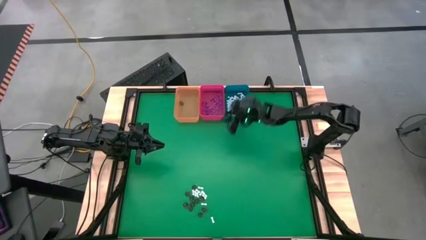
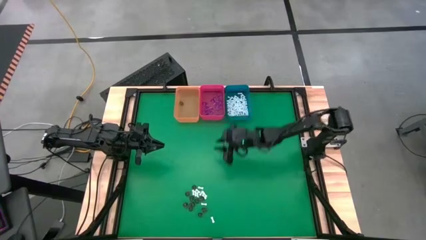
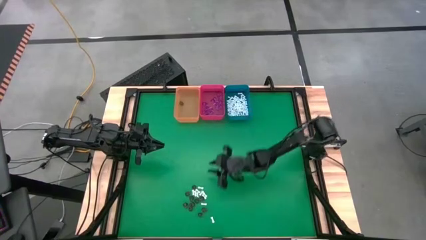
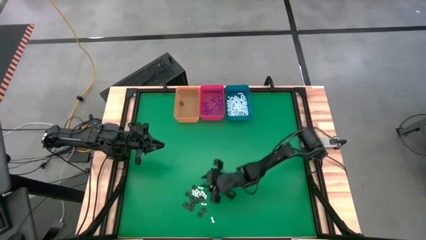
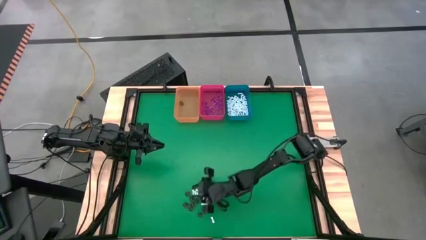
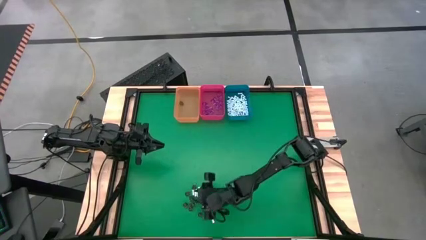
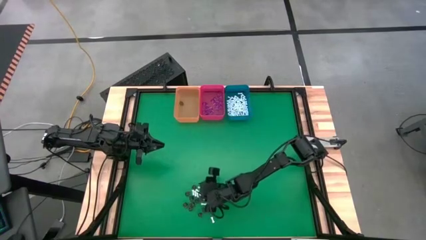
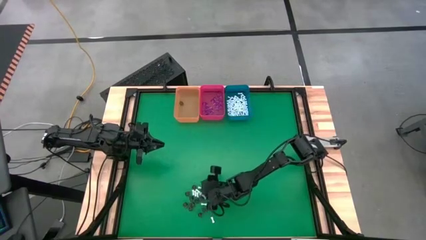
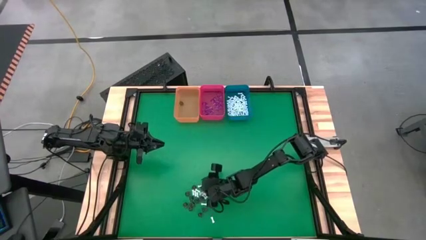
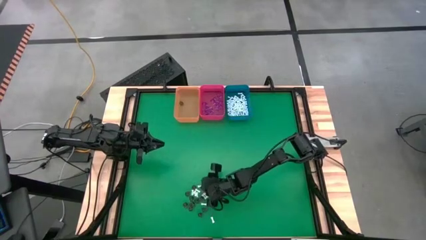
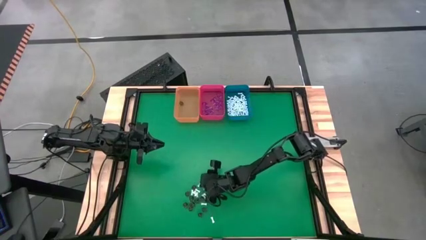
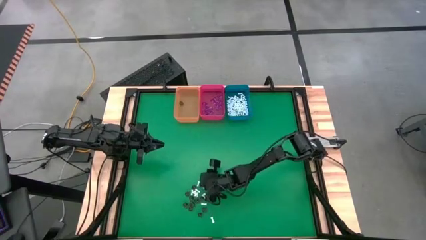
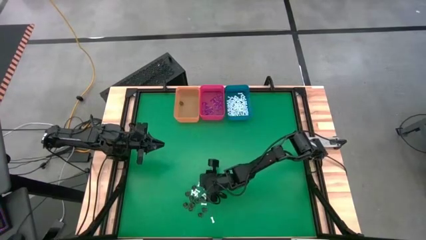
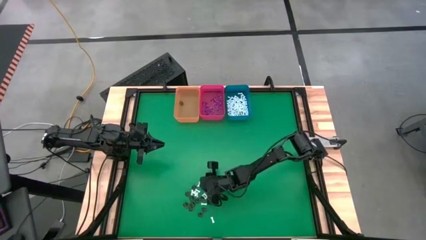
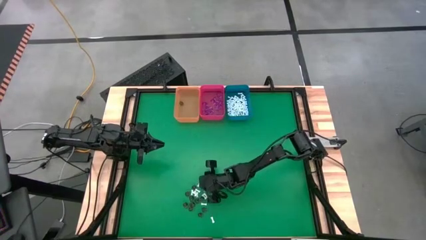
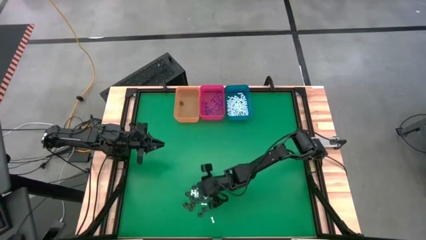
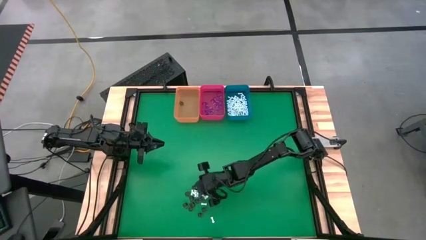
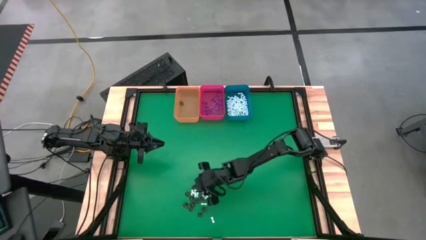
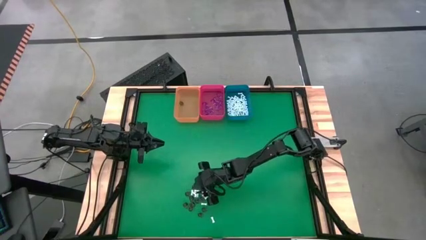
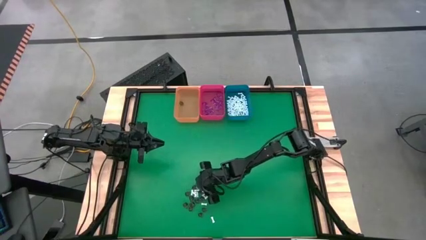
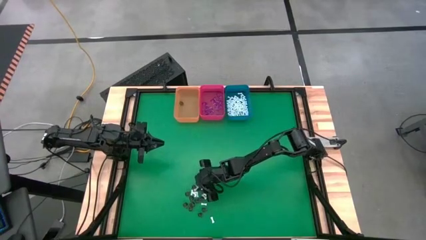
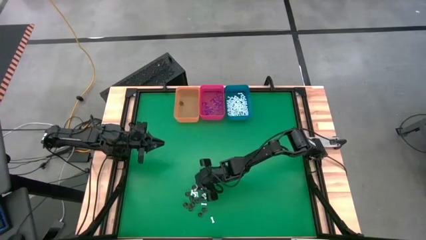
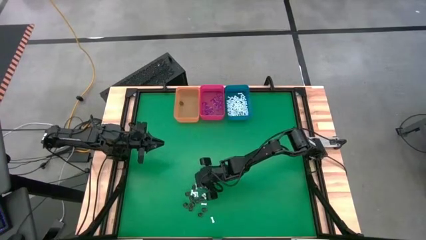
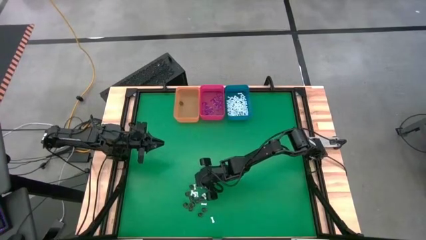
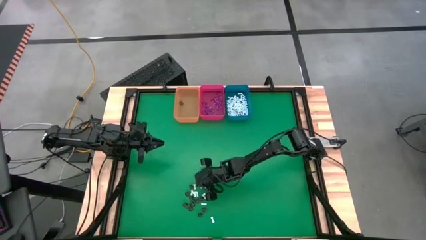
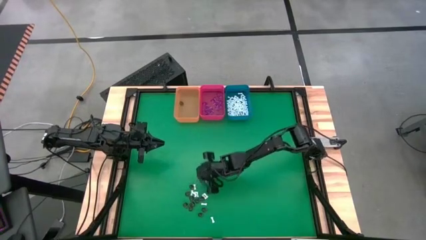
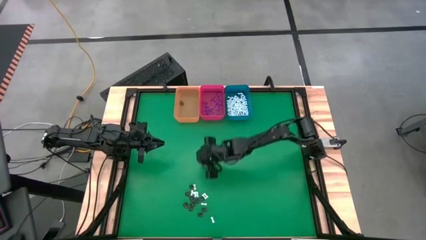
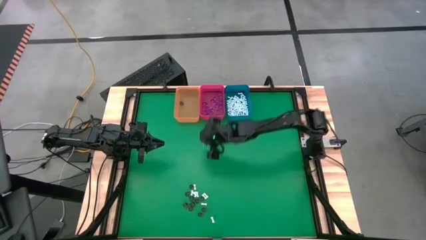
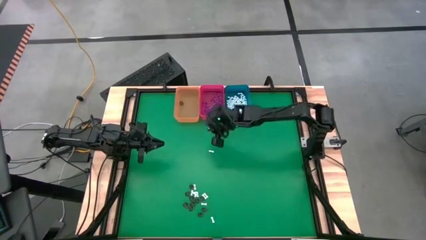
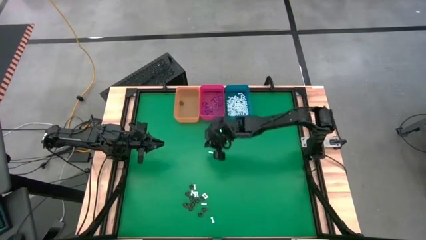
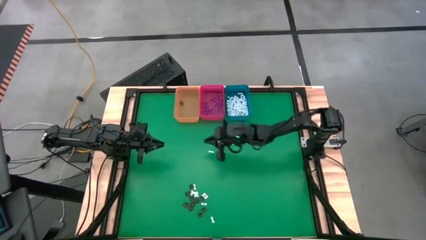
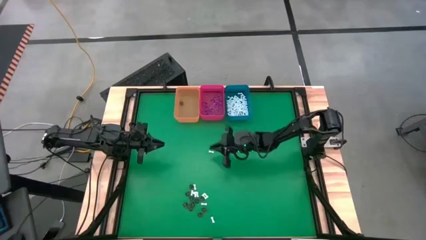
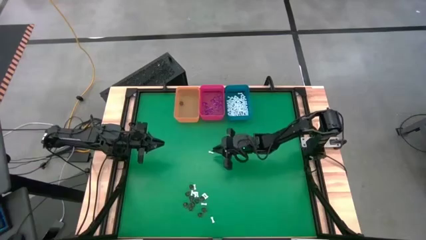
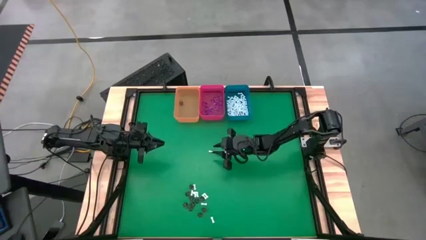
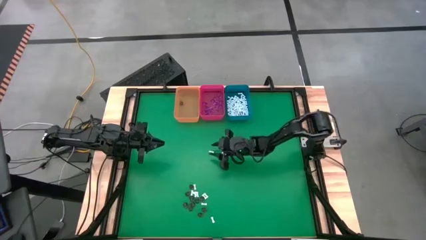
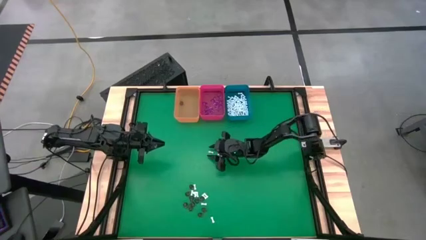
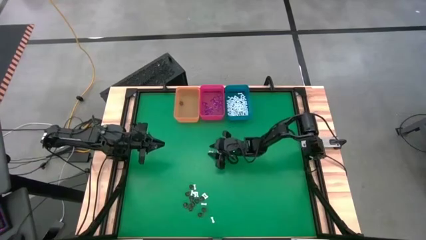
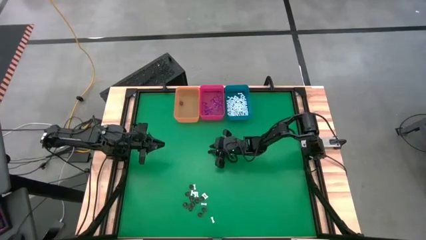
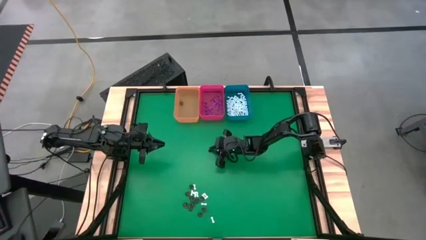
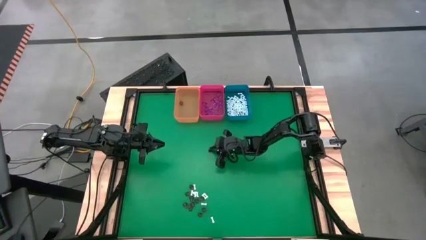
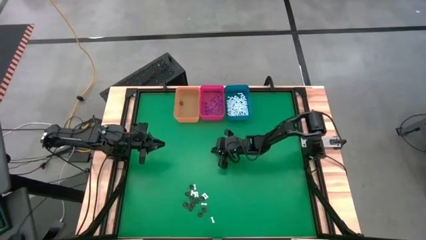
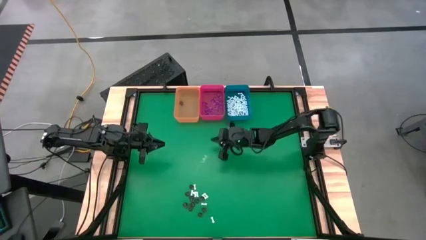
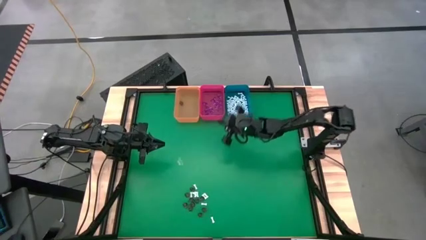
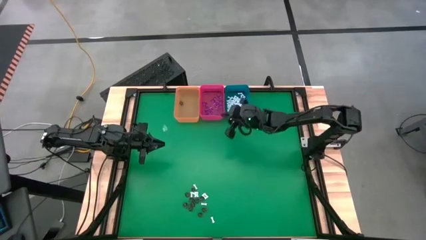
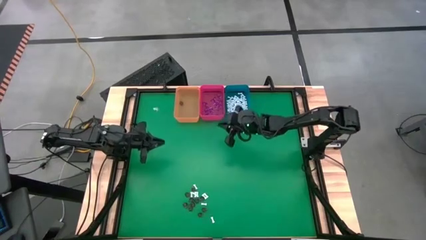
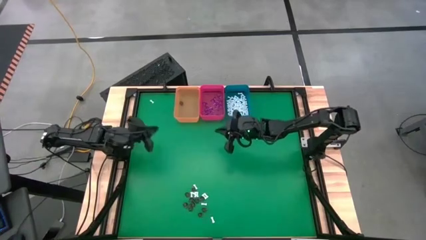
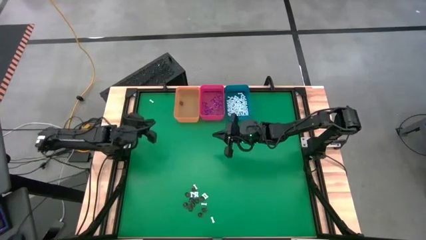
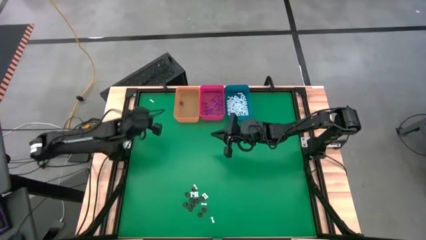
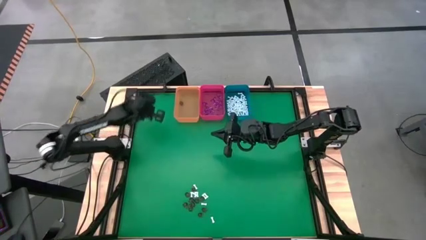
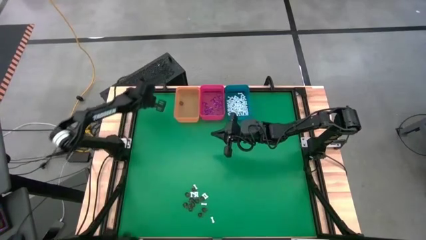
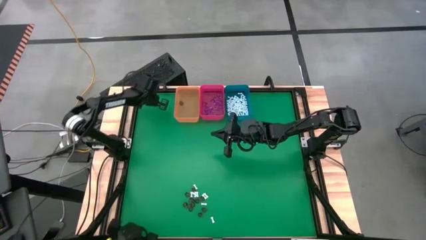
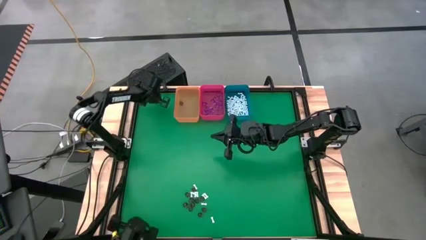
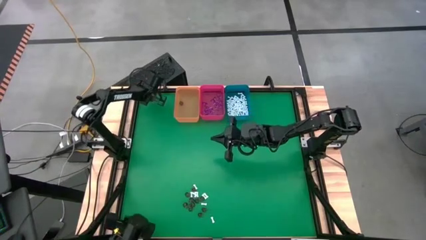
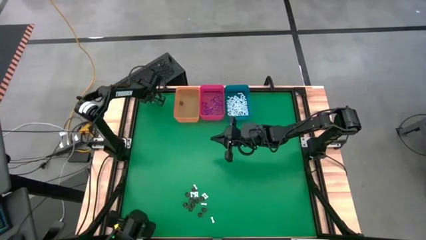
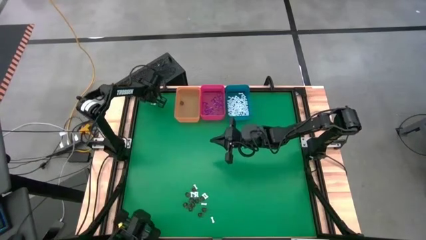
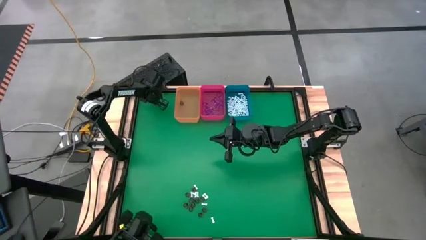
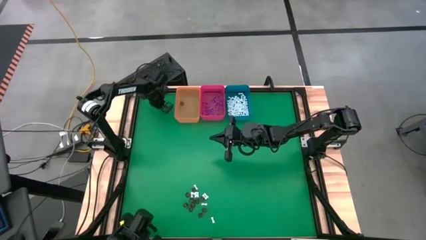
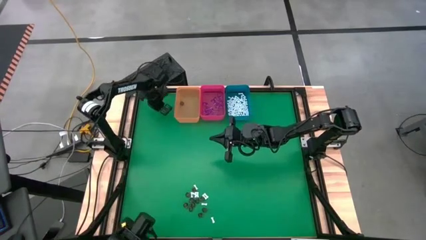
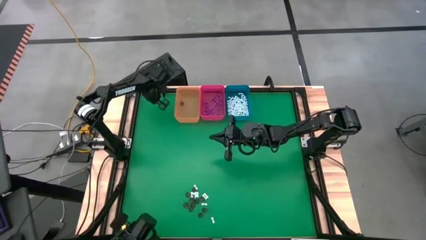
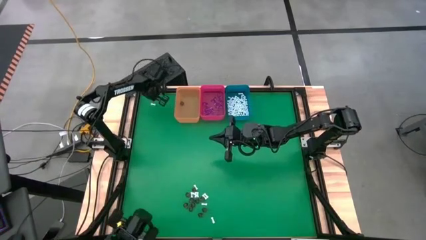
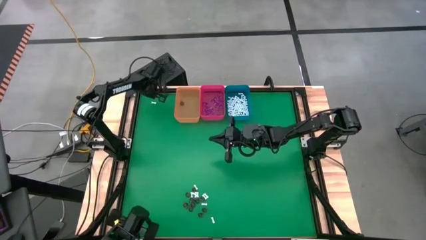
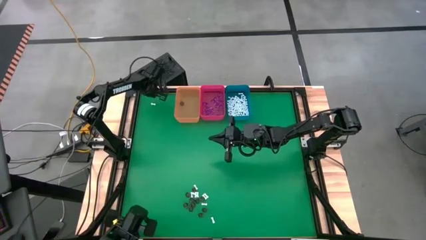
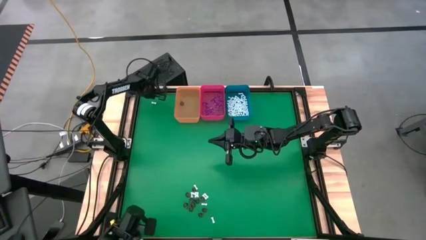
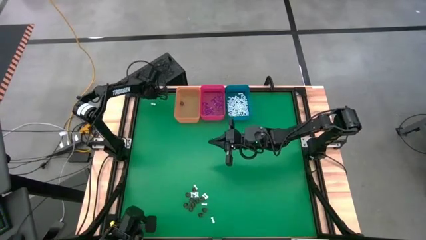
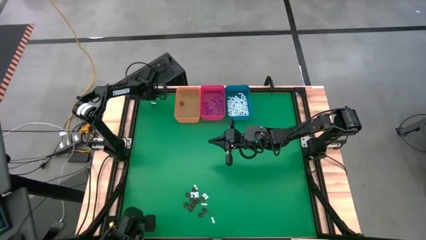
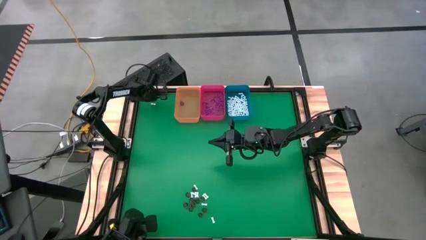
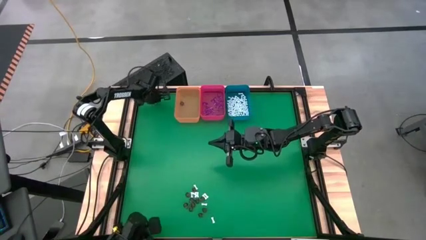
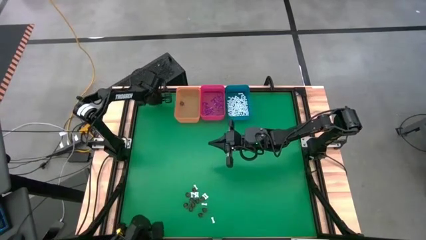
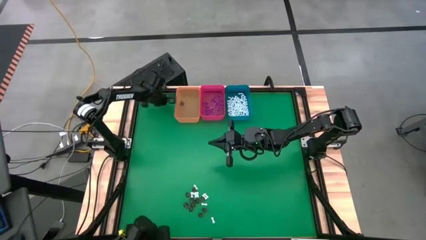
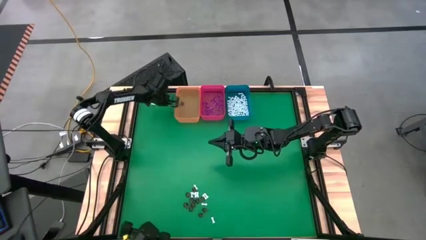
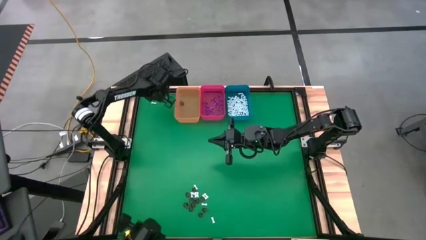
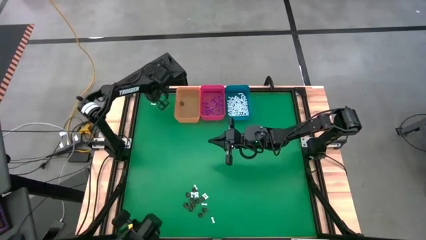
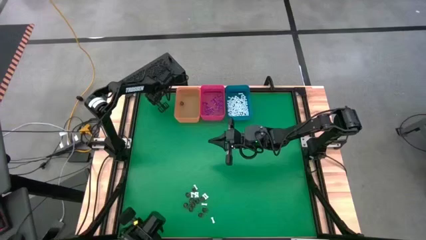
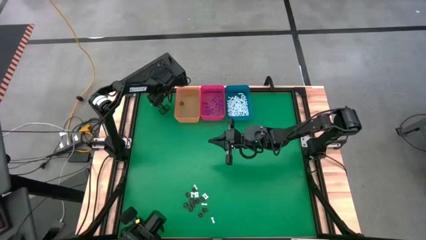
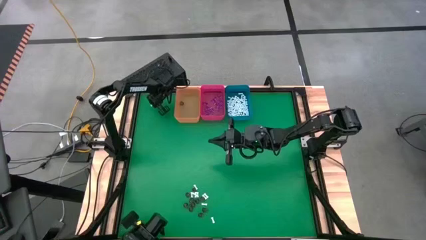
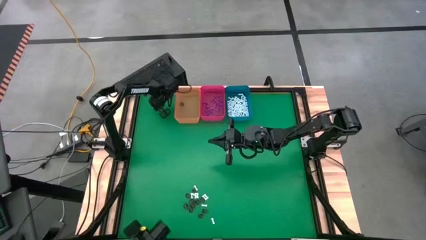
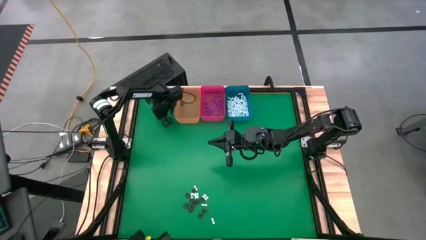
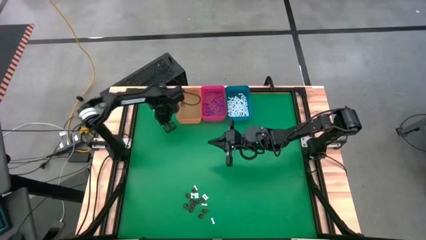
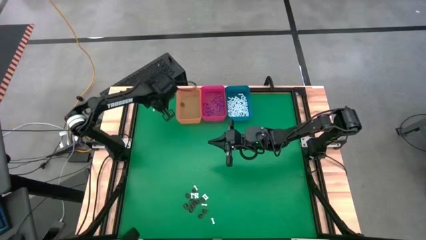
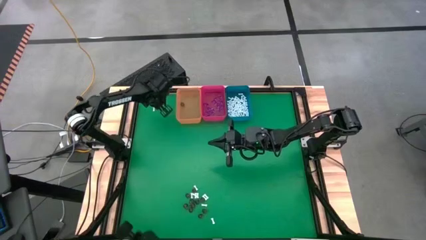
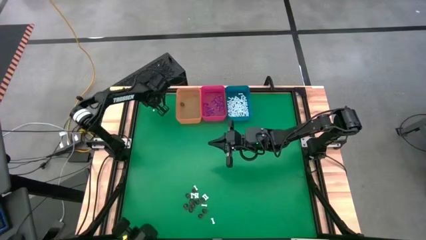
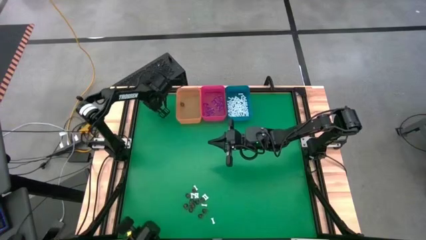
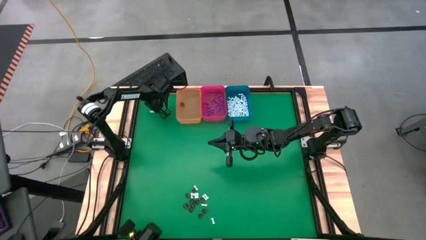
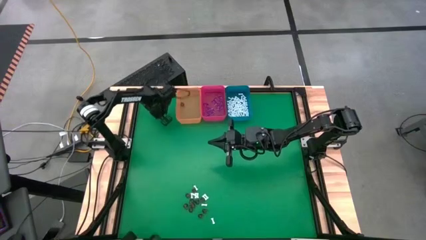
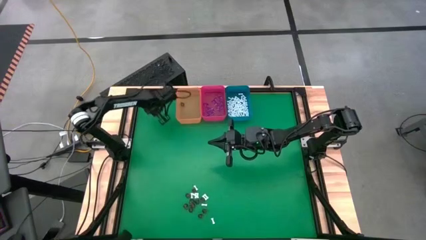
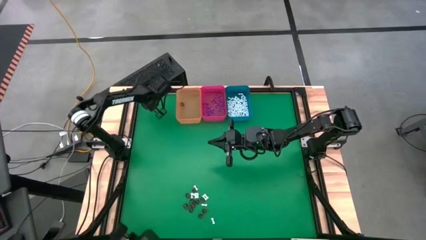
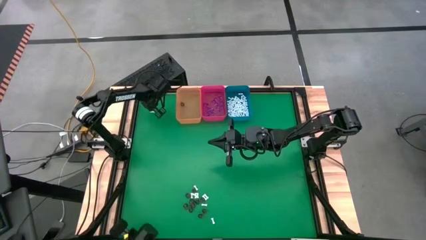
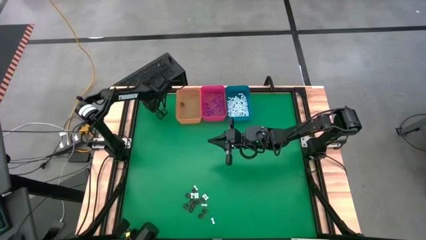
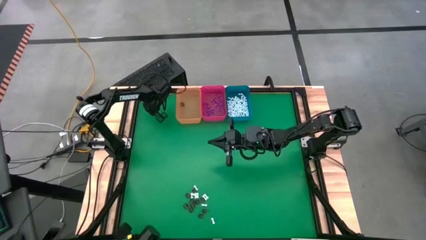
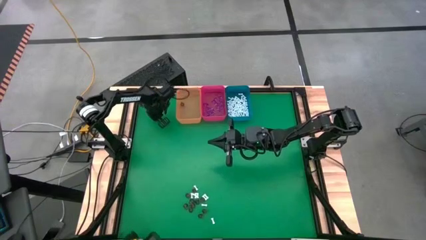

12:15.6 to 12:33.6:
Task: Sort Halloween decoration
Put the white bone toy into the blue bin
